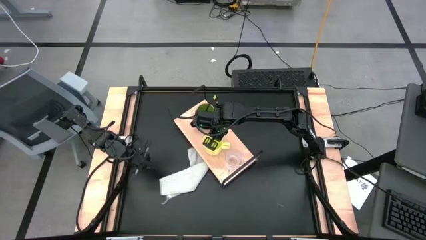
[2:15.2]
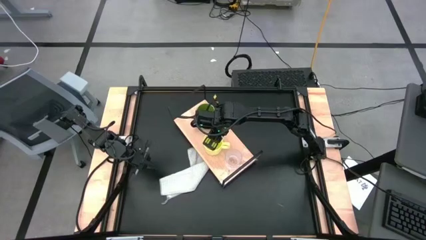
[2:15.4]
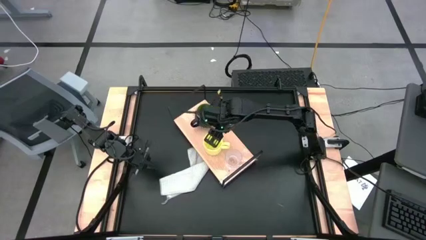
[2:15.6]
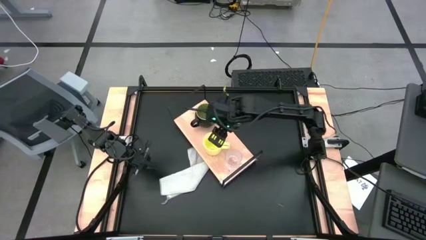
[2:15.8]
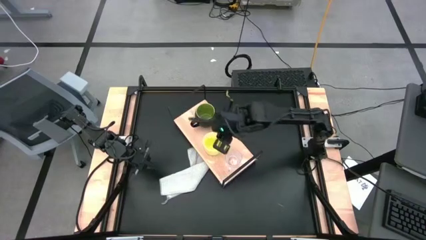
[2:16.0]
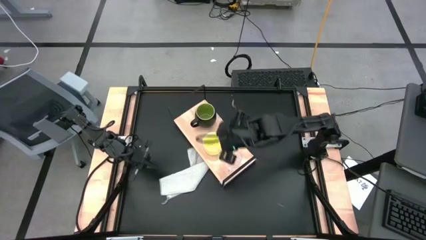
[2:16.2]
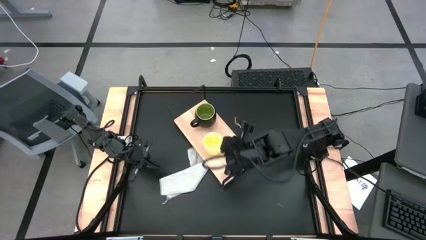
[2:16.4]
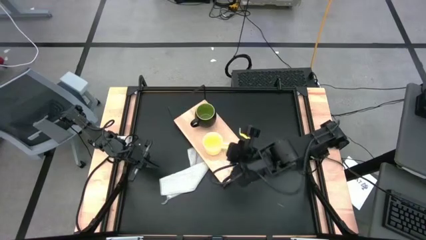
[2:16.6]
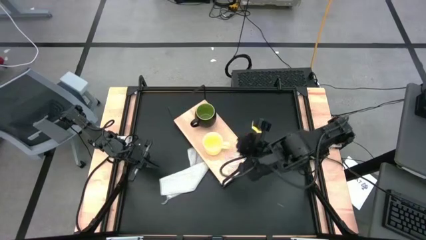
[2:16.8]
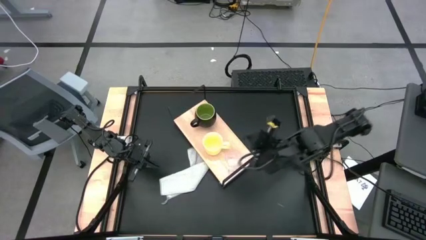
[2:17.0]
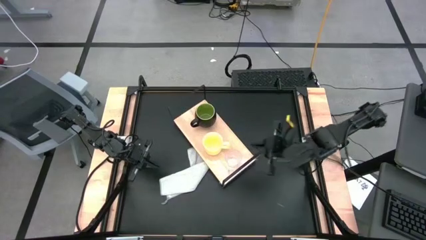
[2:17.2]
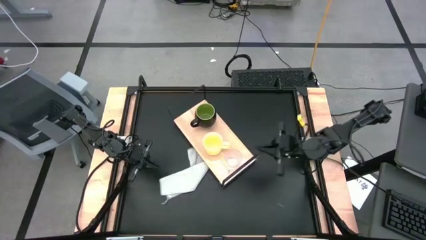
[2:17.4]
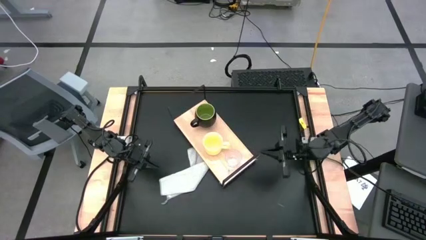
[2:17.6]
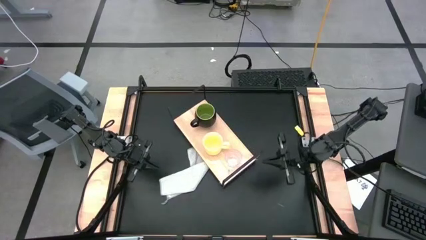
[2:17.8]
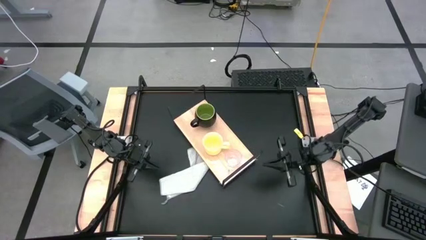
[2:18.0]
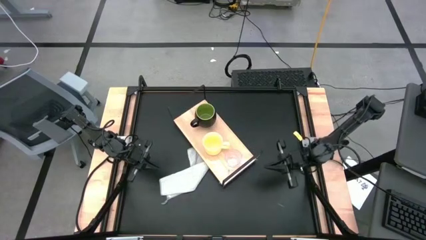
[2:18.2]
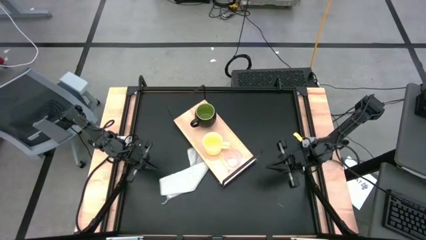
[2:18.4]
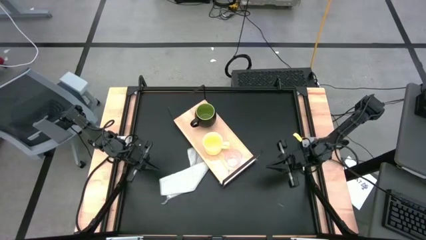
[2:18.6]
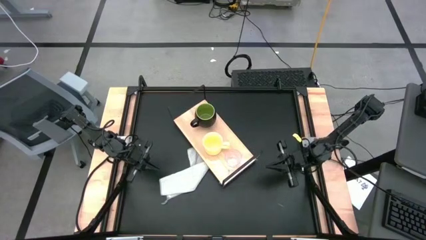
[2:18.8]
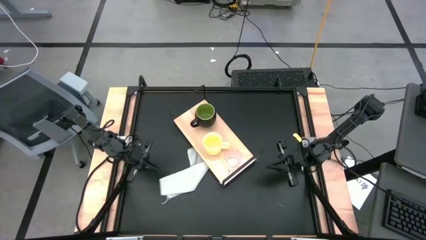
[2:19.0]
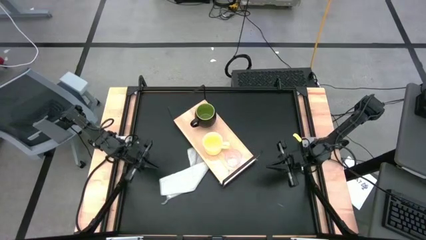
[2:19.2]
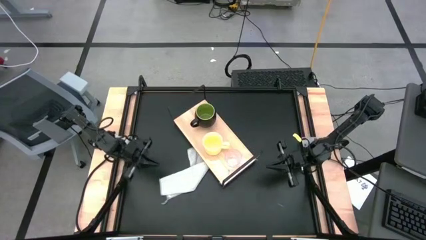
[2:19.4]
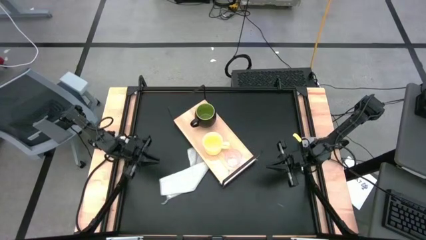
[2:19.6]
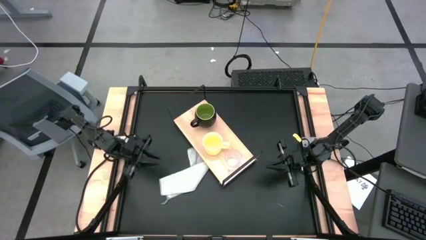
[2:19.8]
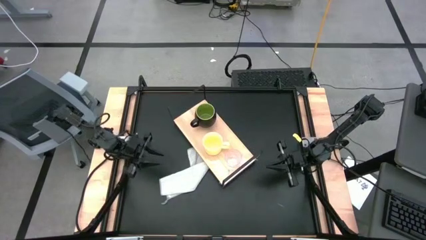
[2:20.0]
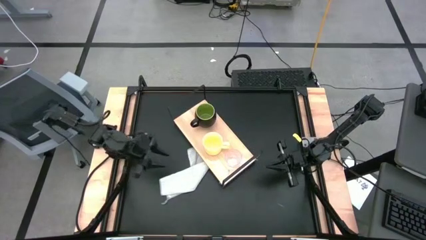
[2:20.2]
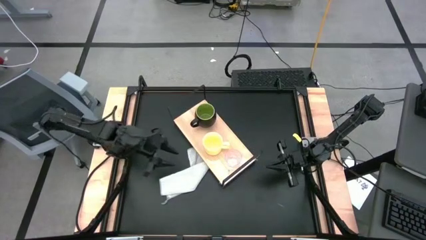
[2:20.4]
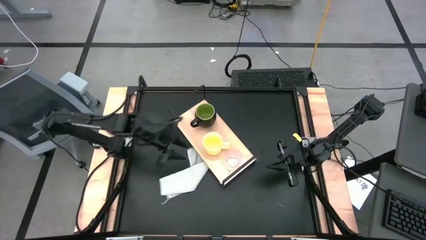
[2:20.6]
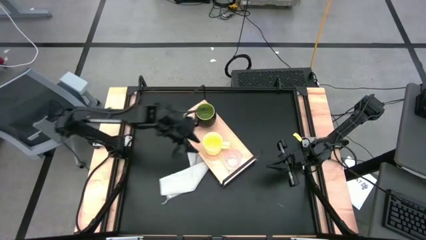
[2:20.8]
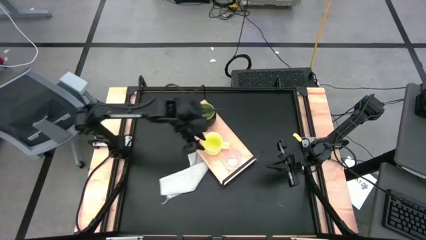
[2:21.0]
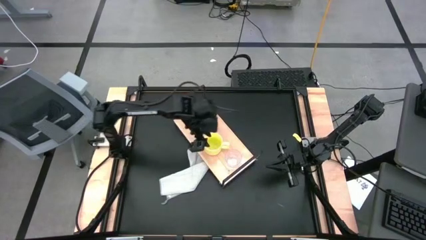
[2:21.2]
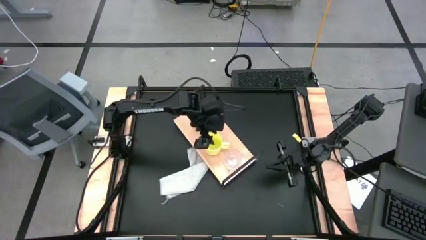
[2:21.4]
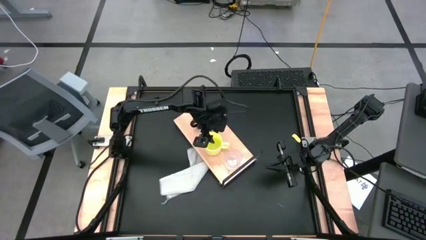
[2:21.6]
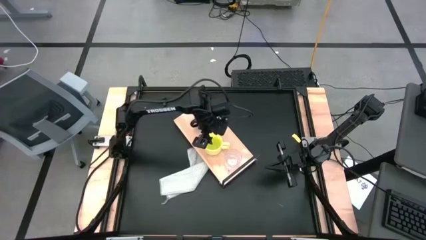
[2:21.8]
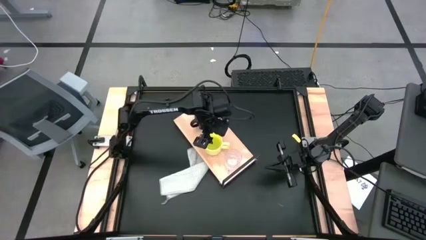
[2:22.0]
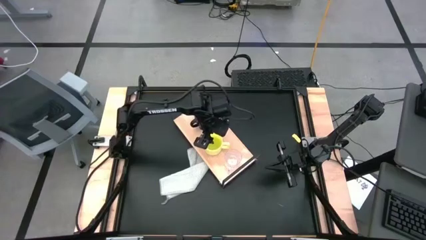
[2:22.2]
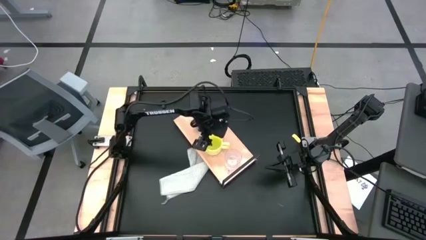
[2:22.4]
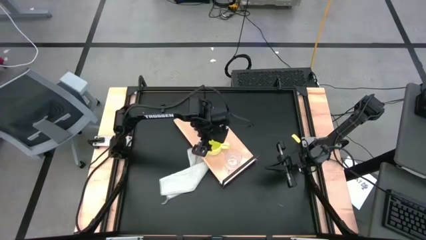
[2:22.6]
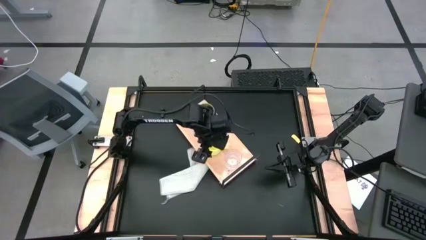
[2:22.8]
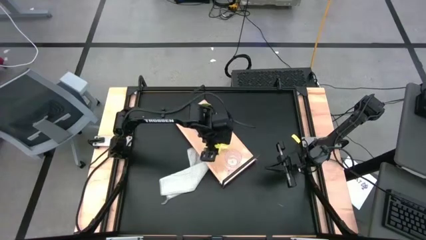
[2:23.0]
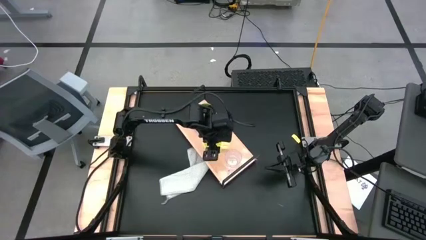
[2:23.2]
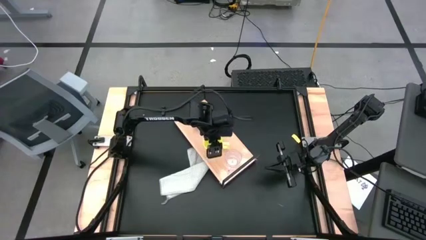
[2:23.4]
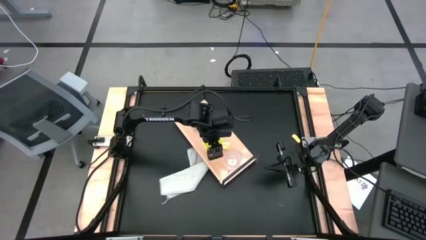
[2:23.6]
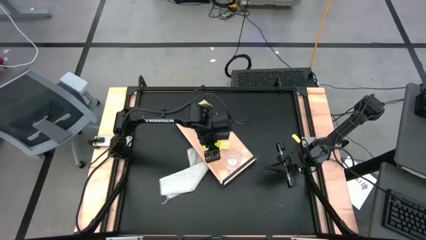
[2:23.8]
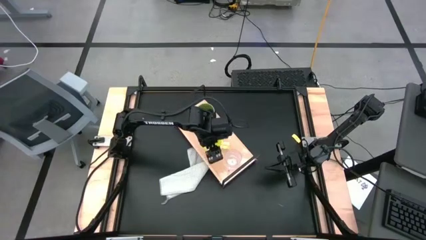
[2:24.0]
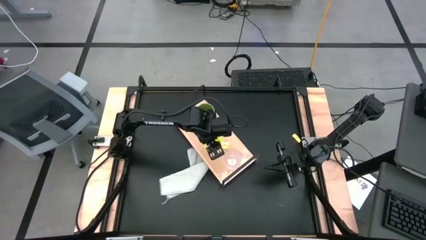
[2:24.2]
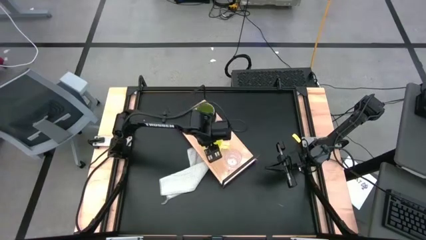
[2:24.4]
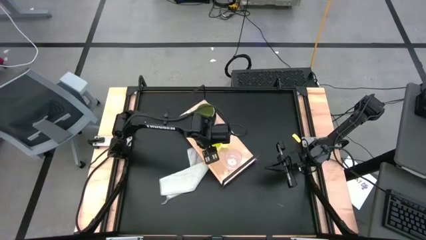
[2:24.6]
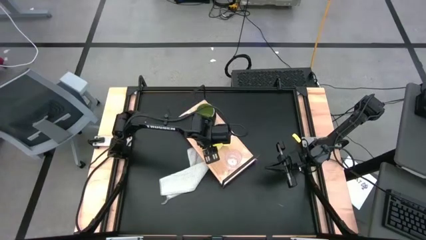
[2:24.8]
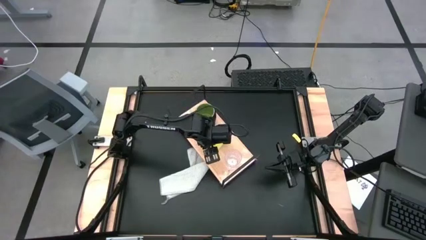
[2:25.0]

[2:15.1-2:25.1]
Task: Stack small to large cups/mugs on shelf
Adjust all the mugs

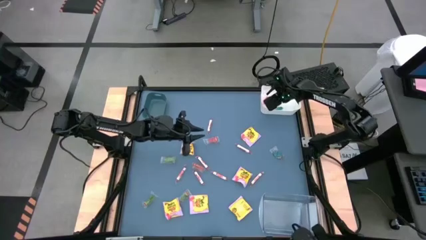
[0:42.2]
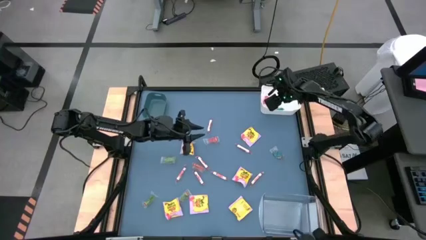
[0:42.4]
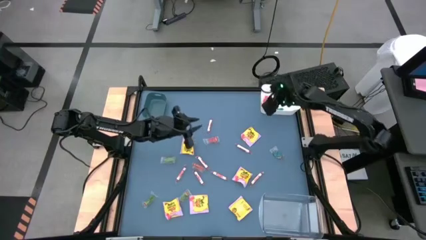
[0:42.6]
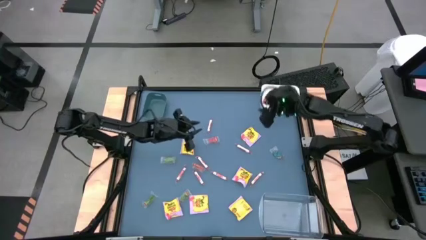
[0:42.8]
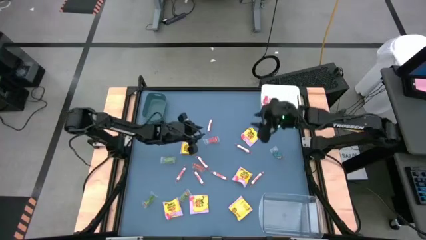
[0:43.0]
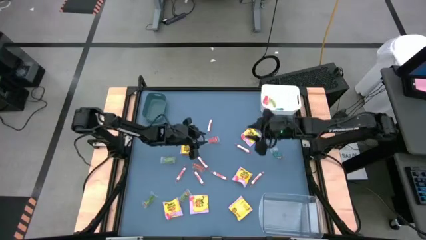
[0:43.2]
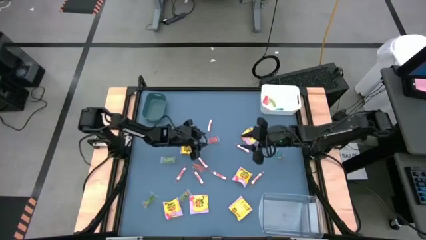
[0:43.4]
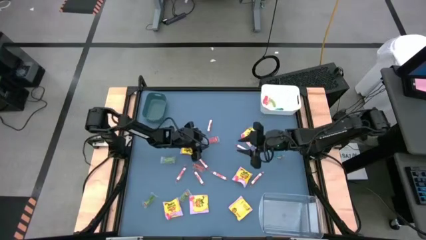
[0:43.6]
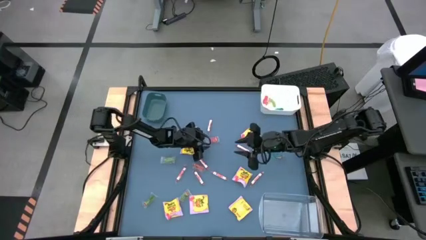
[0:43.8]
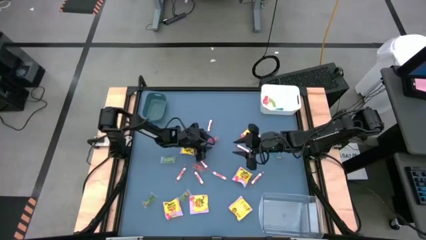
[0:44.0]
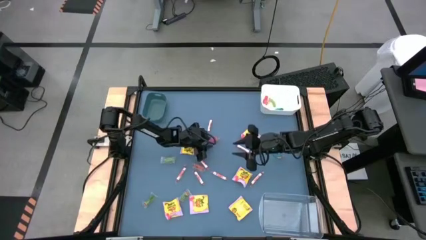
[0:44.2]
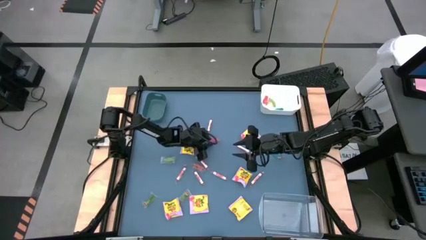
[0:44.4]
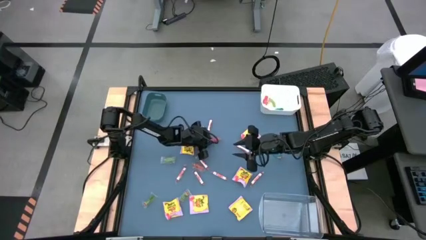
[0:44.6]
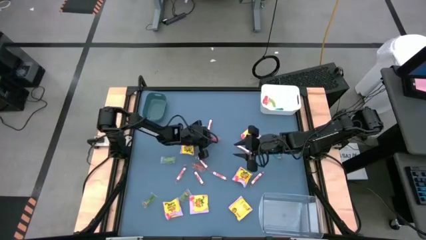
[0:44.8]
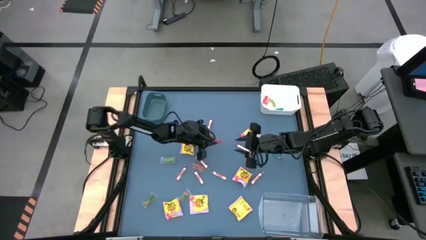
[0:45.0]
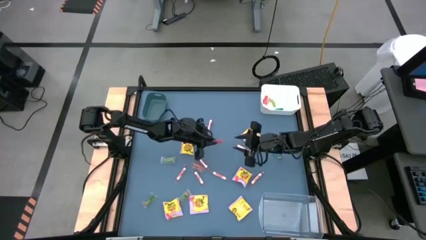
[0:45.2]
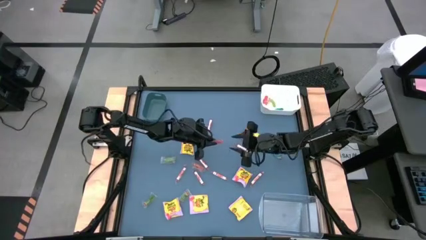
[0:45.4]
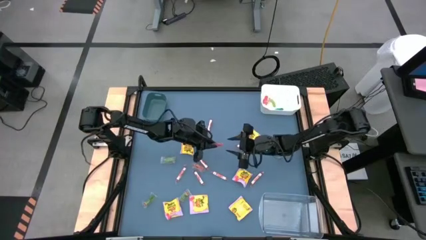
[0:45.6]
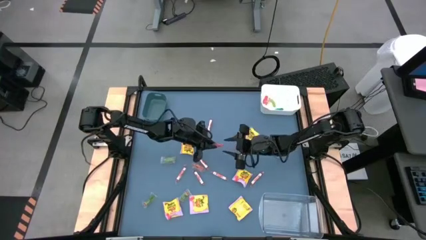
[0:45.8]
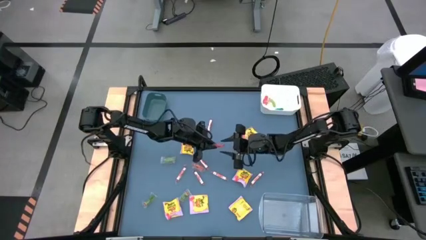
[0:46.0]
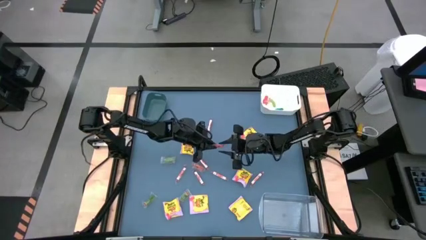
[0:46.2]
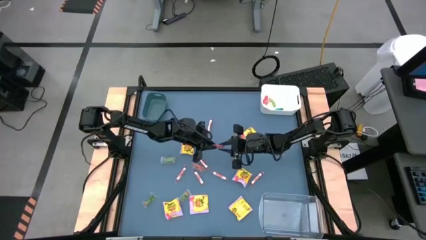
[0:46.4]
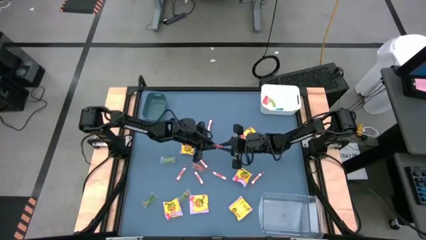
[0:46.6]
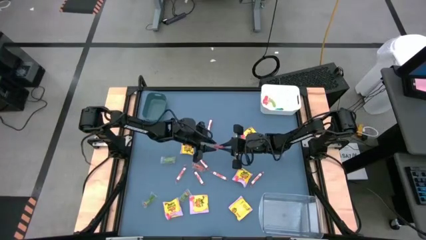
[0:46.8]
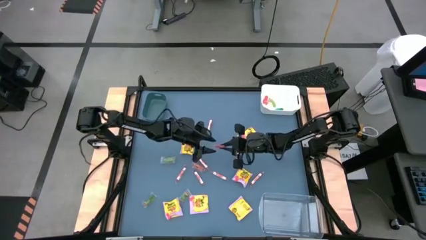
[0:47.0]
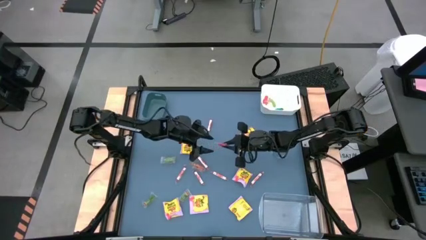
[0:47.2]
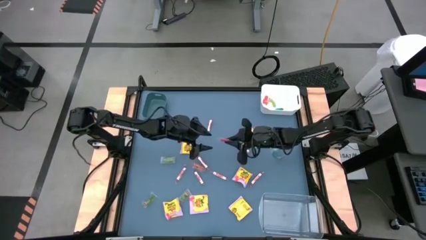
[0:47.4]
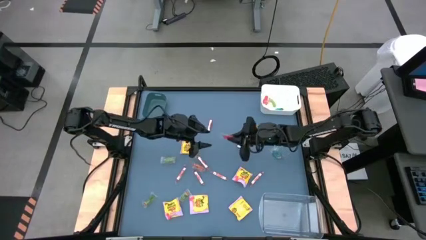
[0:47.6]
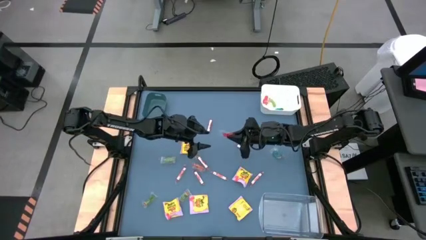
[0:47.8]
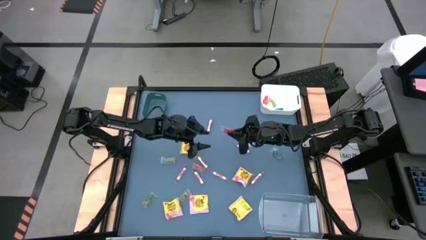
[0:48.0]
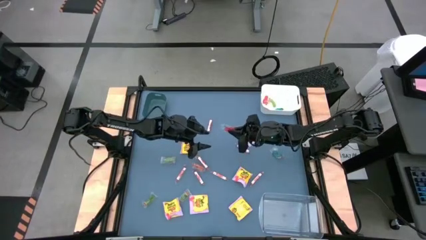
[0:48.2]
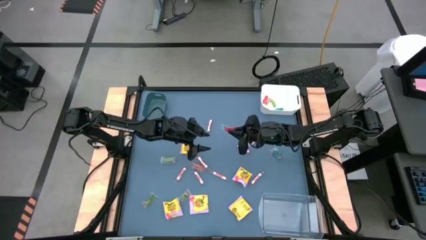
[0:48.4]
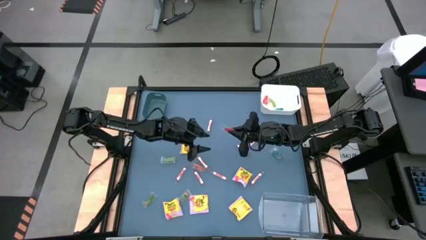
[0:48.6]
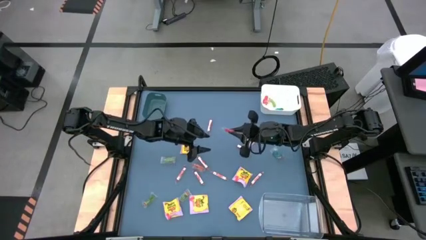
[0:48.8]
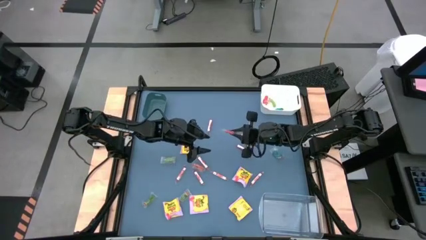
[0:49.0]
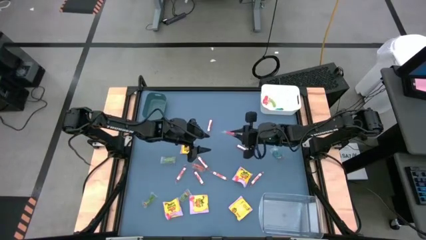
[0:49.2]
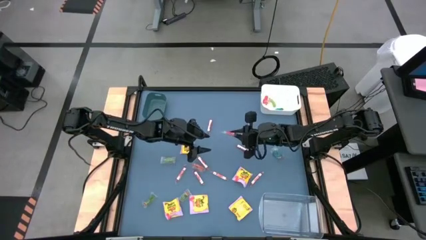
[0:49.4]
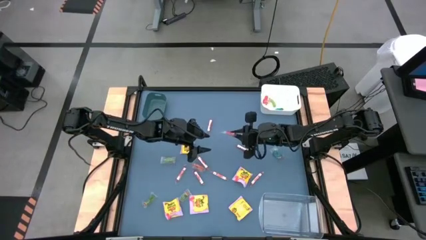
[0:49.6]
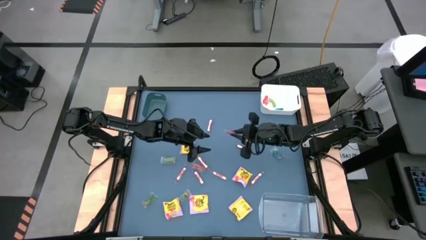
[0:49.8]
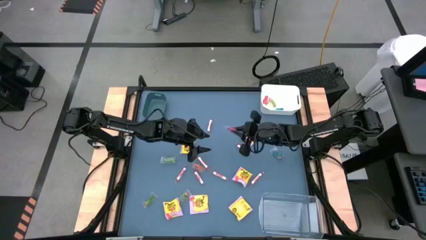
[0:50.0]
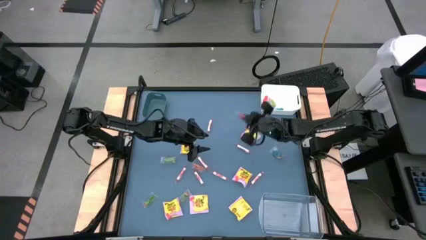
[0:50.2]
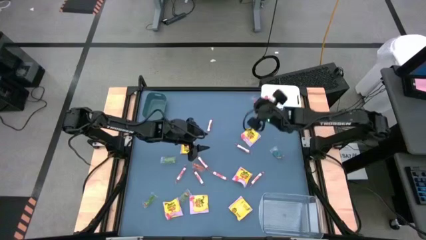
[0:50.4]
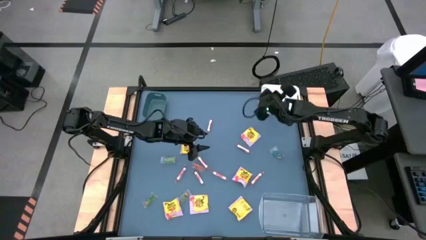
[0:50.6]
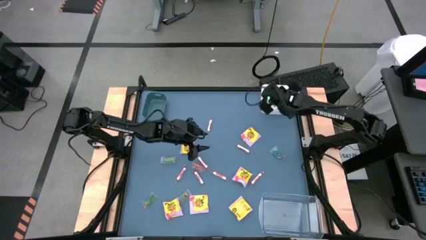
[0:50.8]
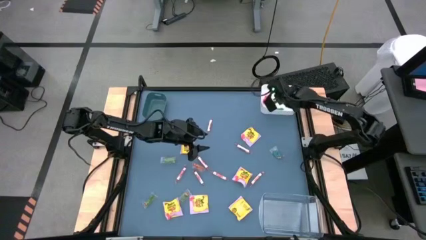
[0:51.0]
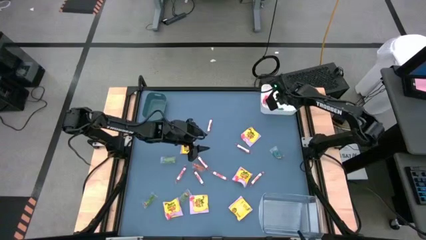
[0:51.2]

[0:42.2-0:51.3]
Task: Sort candy
Put the red gummy into the white bin
